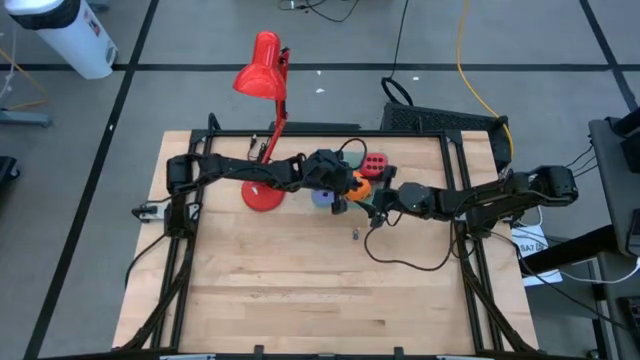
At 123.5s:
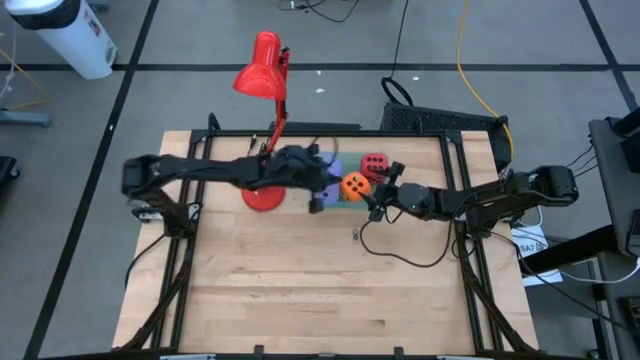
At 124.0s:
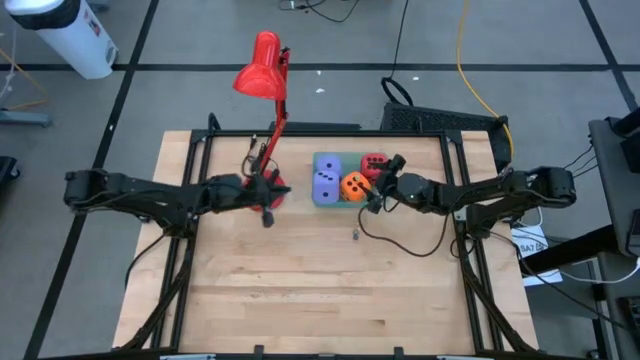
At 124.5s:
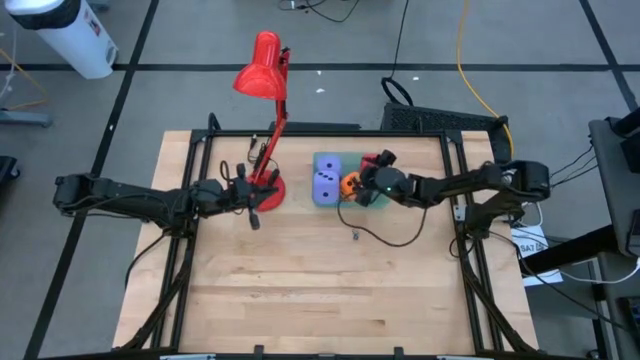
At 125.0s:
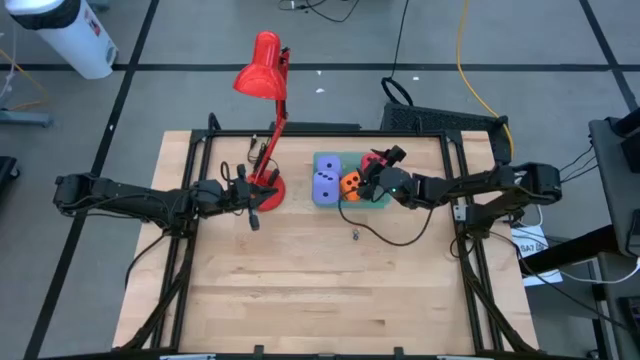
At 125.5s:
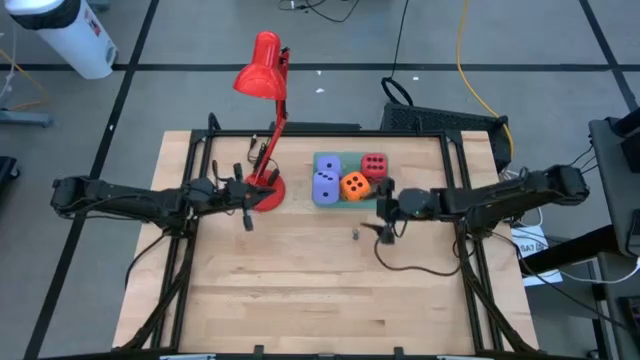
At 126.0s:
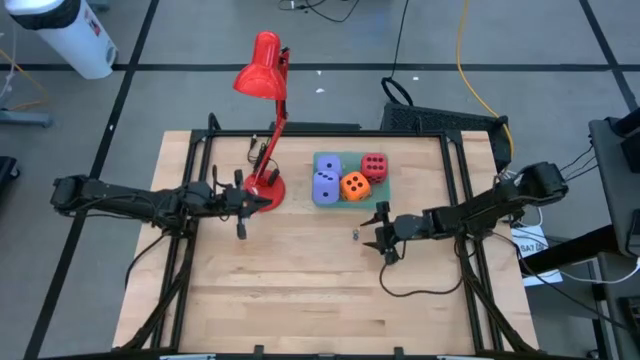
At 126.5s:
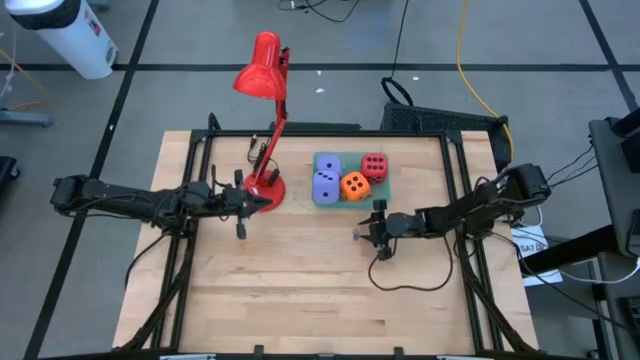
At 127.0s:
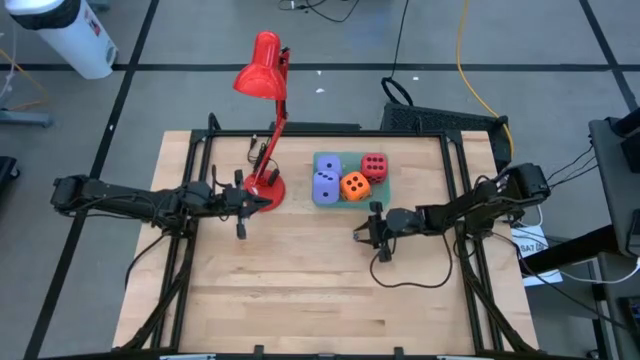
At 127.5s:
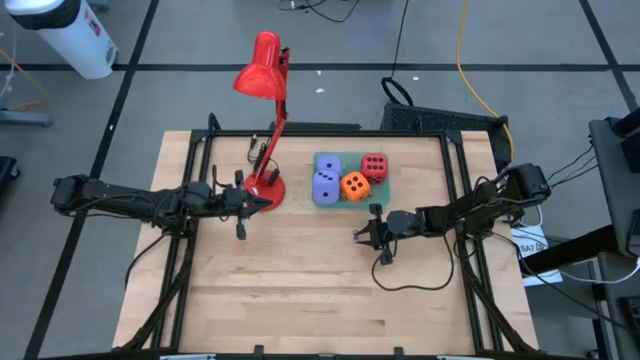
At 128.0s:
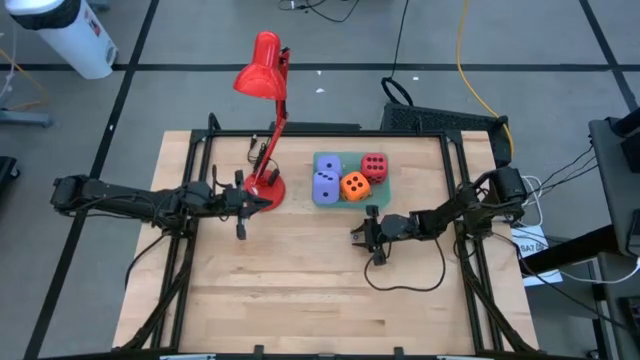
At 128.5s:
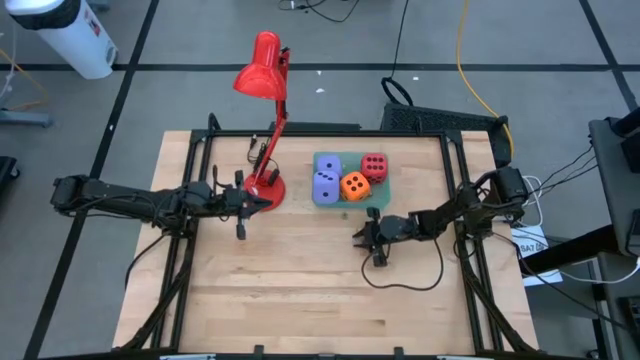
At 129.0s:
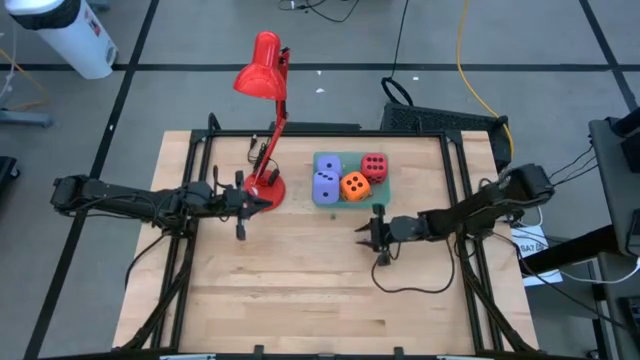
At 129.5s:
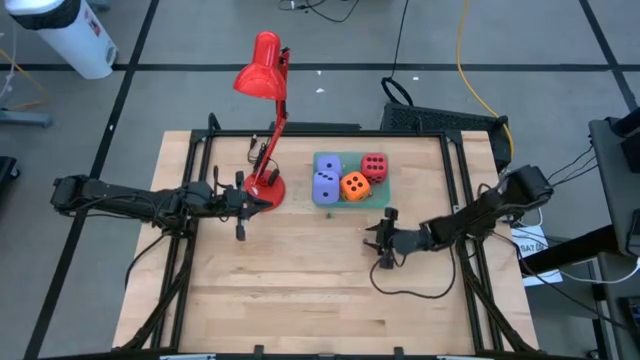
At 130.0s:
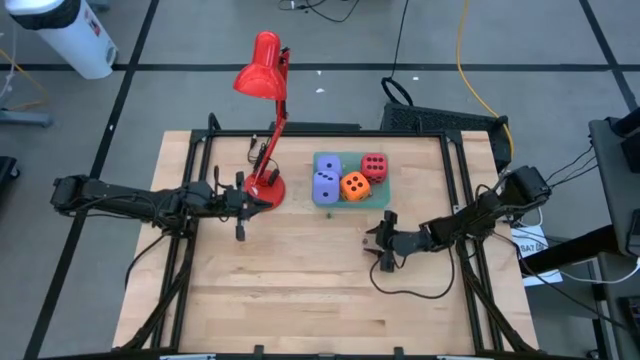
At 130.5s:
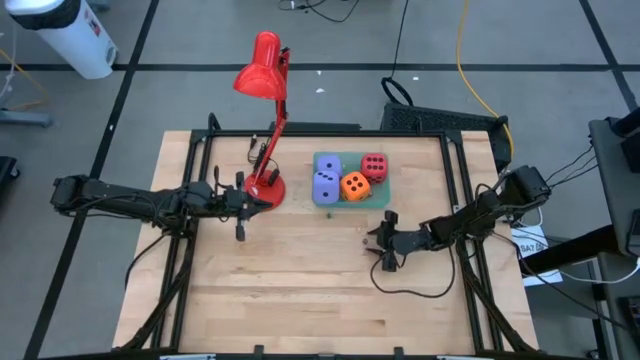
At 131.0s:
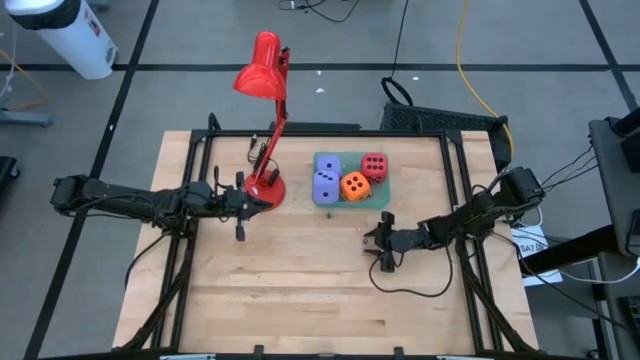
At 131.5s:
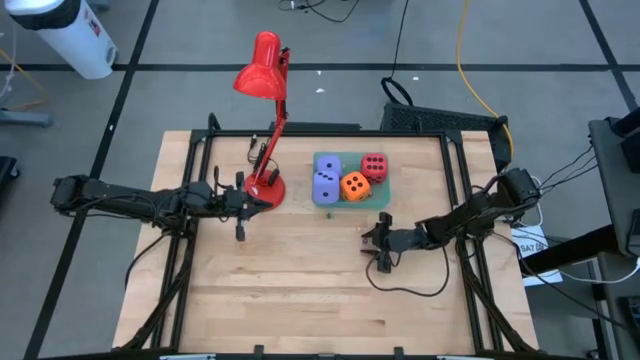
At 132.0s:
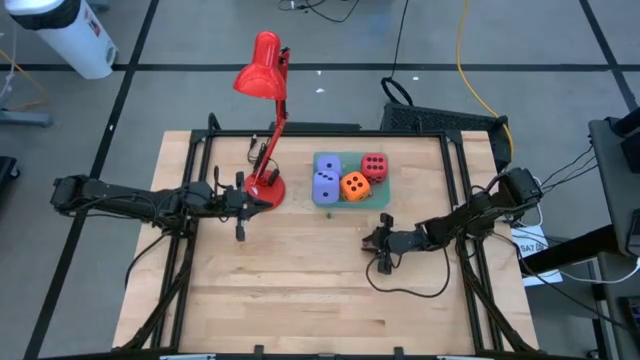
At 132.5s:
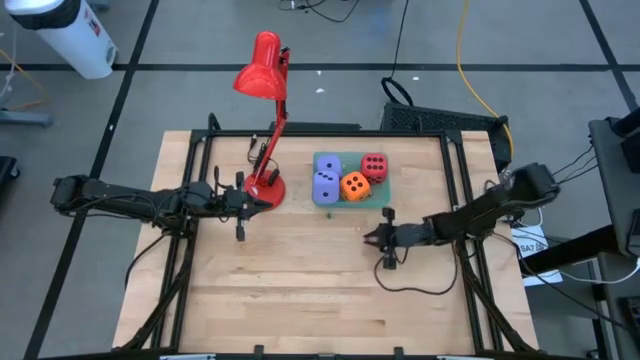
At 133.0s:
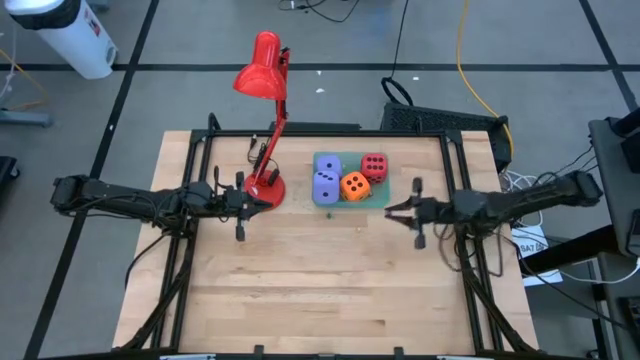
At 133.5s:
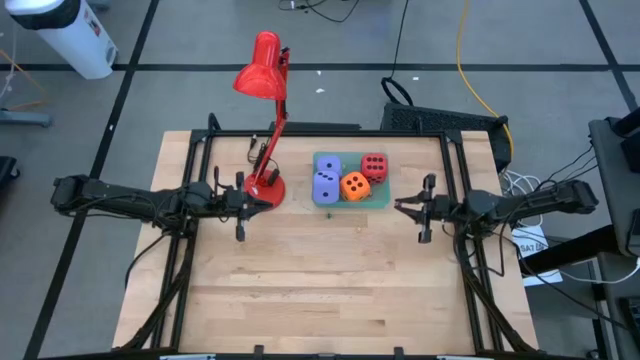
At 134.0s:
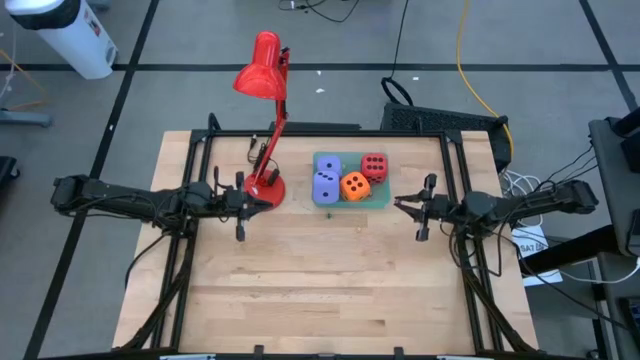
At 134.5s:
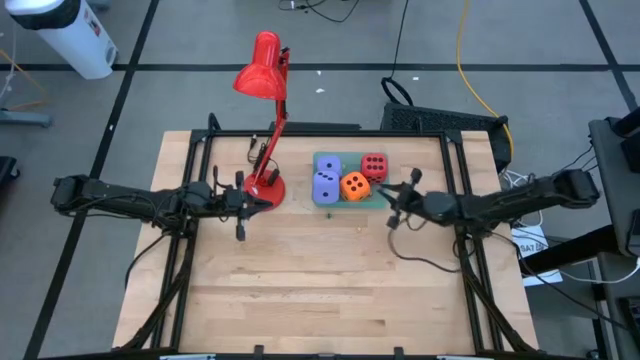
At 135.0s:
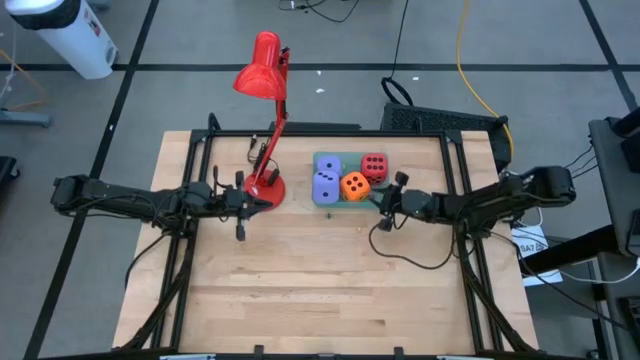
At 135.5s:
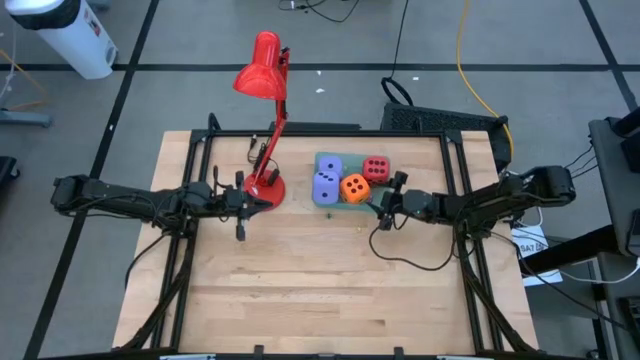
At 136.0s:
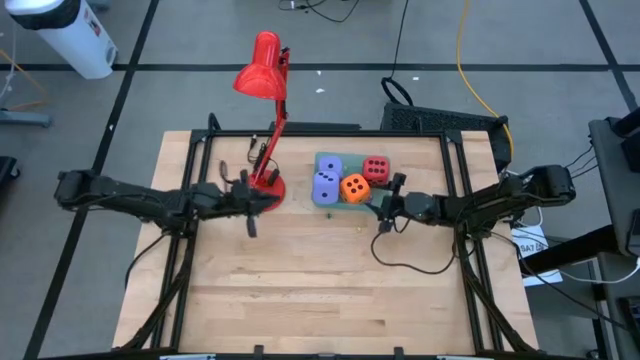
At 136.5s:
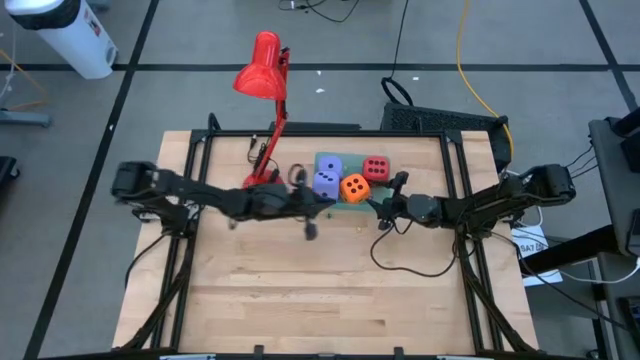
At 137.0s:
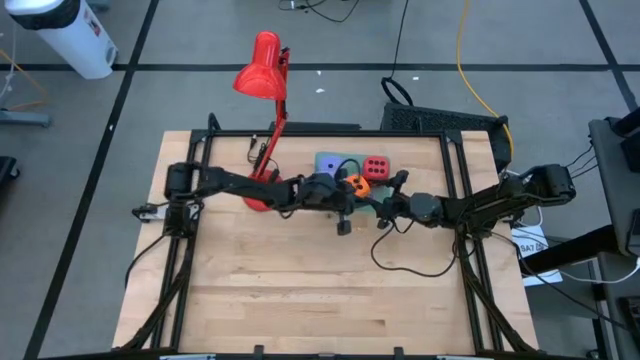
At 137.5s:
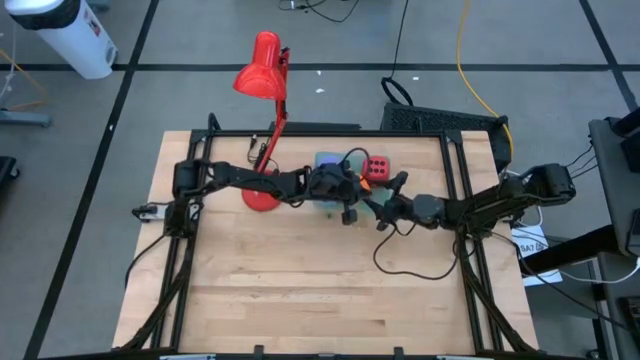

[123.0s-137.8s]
Task: Pick & Place Dice
Put the purple die into the green bin

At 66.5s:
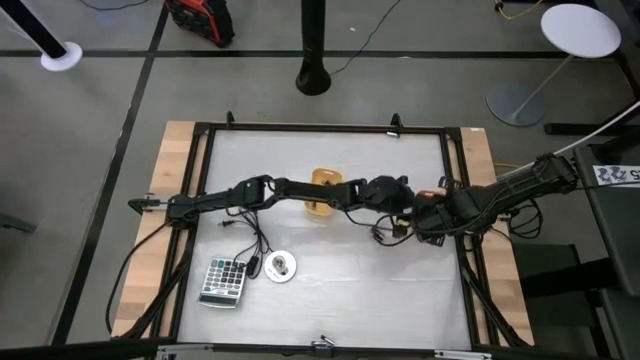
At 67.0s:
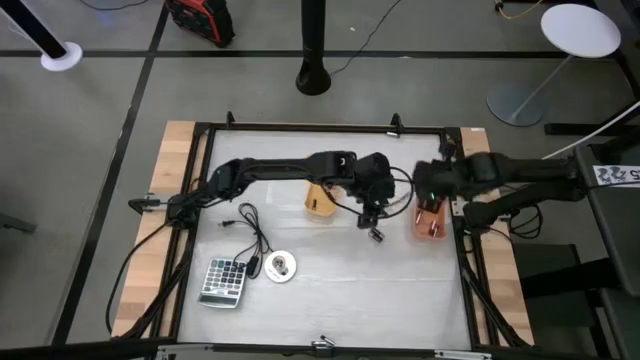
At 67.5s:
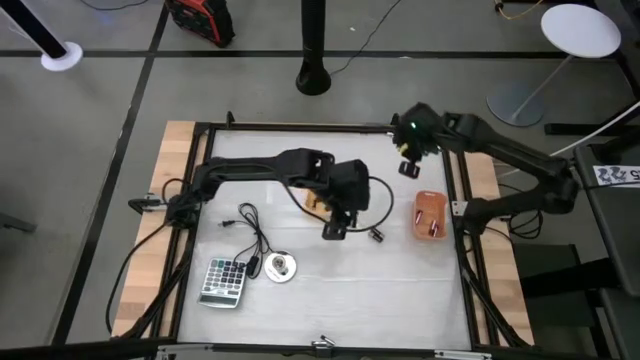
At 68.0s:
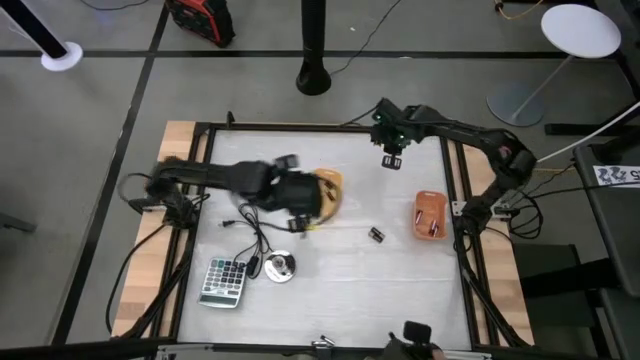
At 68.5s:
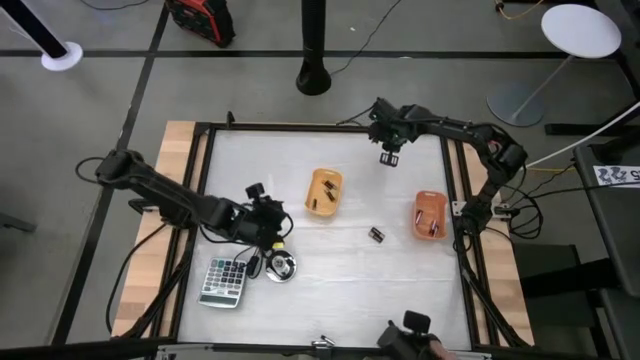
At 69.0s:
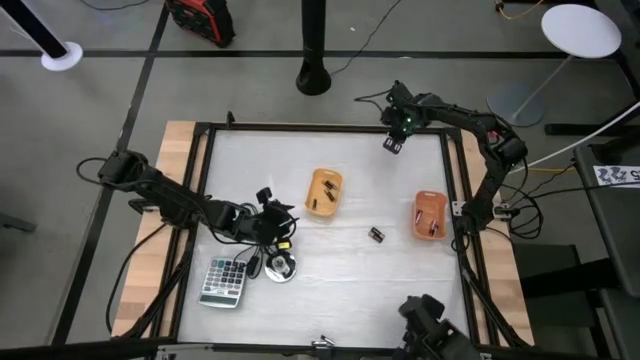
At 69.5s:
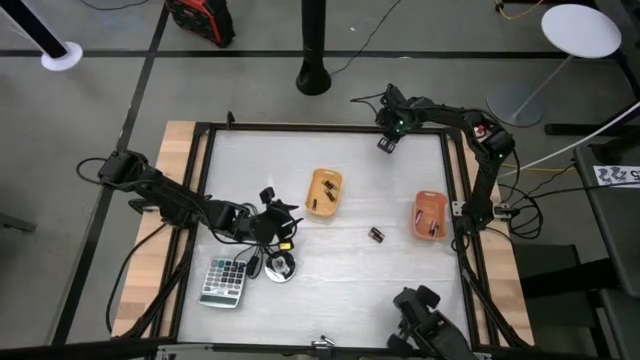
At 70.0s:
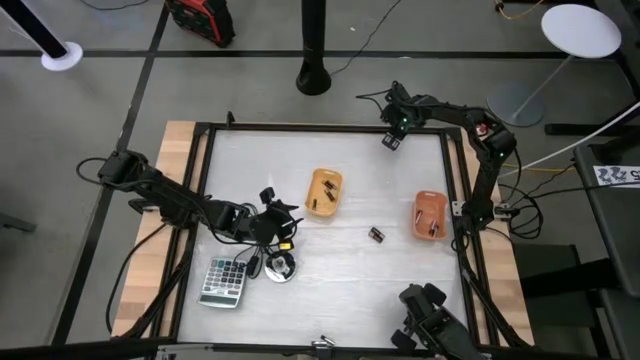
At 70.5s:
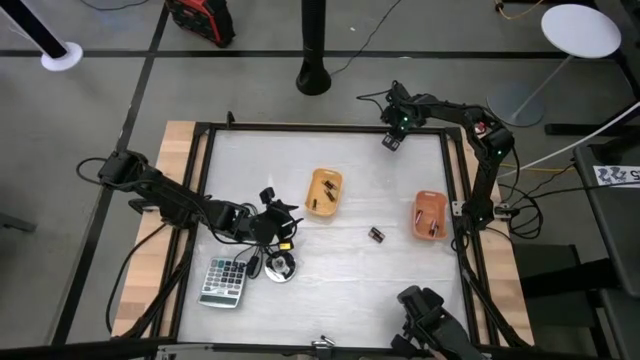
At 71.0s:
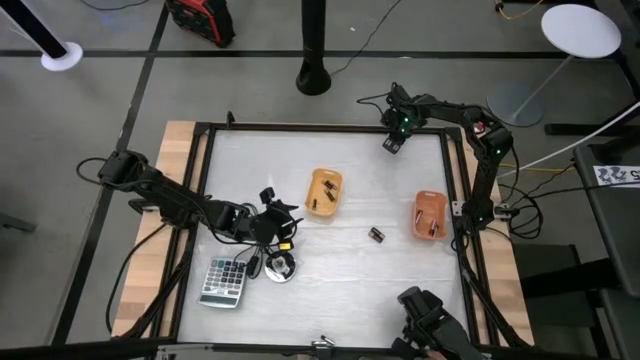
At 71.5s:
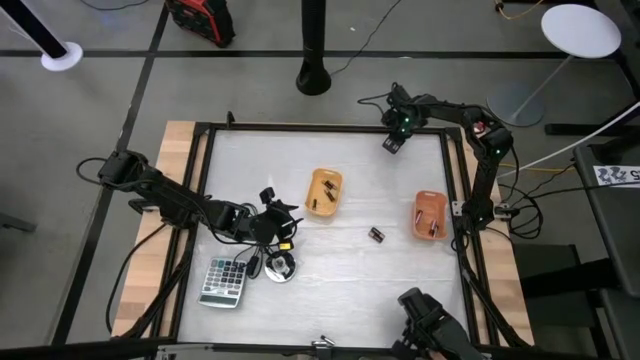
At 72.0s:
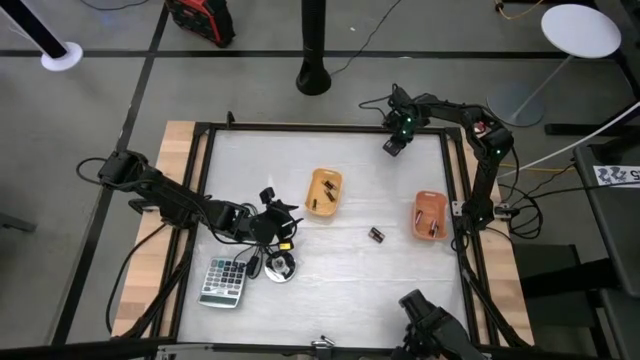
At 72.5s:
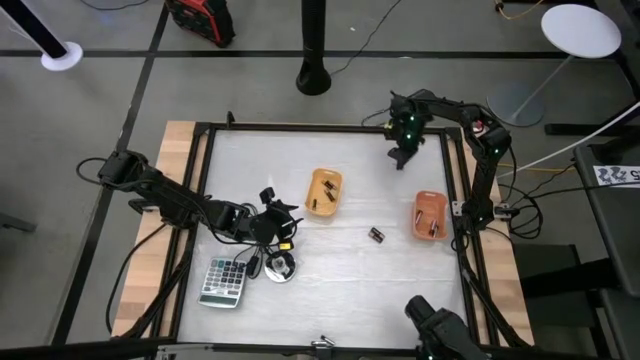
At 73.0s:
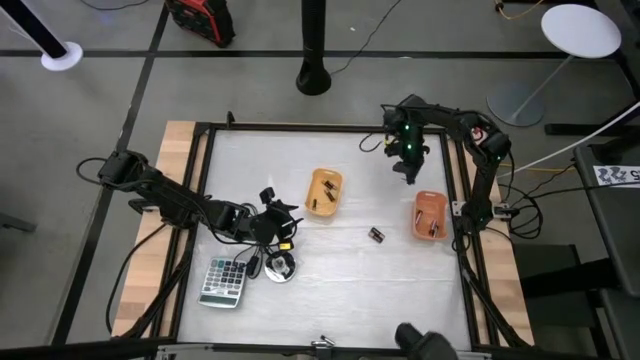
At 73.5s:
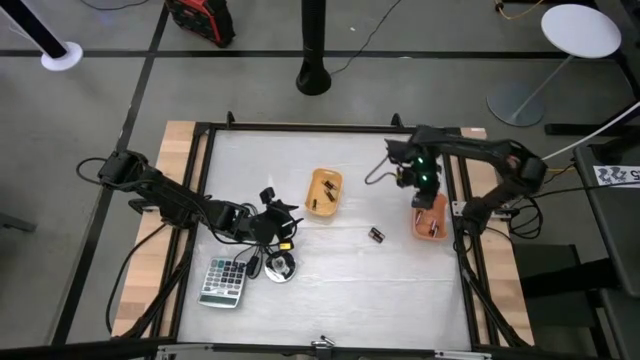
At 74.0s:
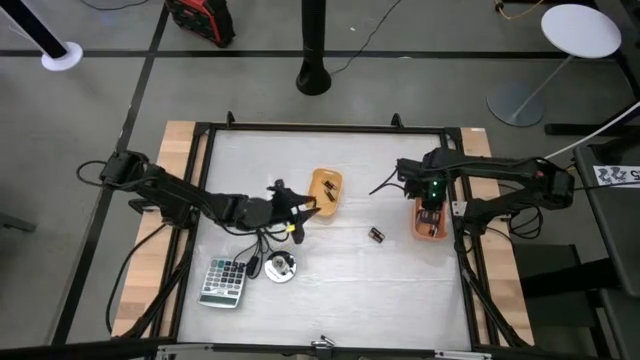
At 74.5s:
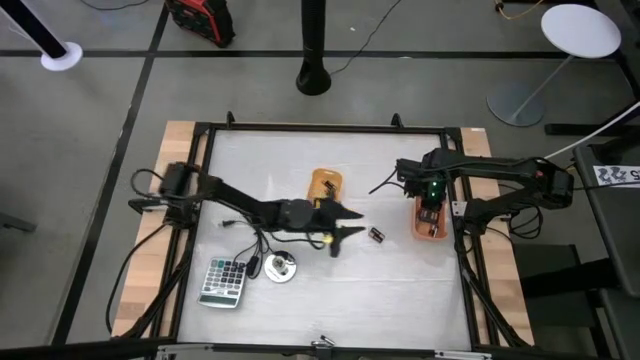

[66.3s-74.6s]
Task: Sort batteries
Put the silver battery into the orange bin
